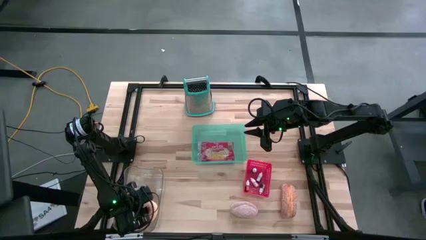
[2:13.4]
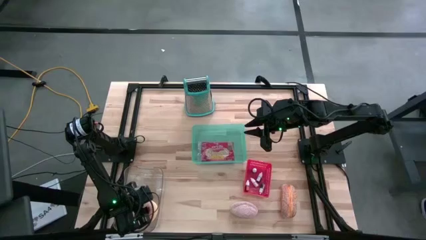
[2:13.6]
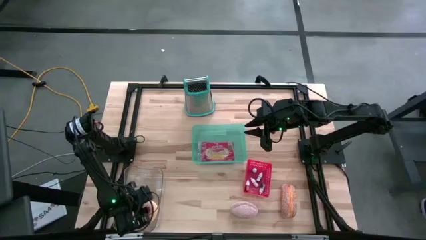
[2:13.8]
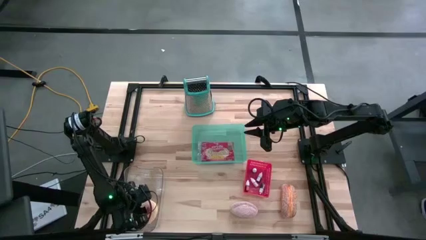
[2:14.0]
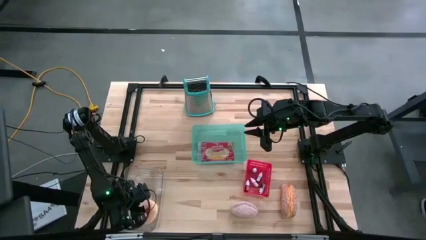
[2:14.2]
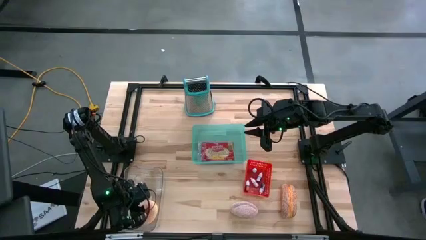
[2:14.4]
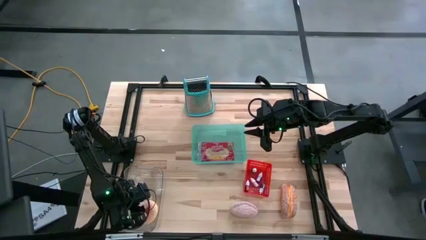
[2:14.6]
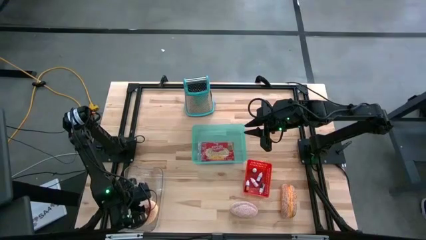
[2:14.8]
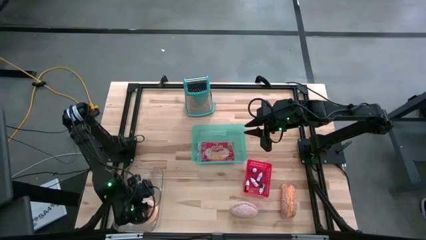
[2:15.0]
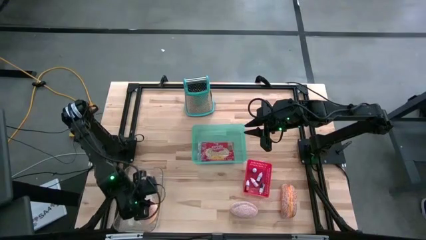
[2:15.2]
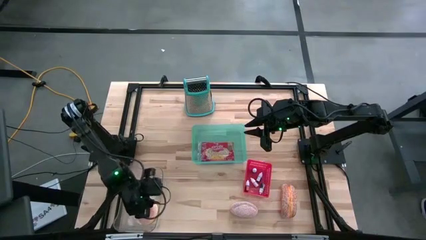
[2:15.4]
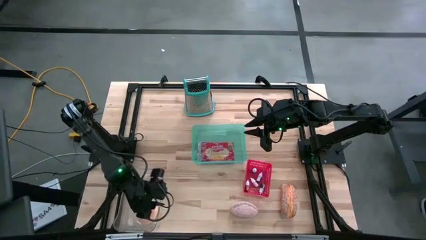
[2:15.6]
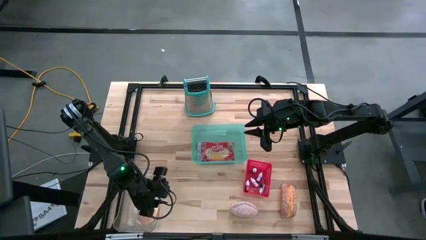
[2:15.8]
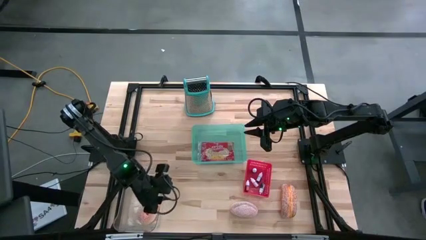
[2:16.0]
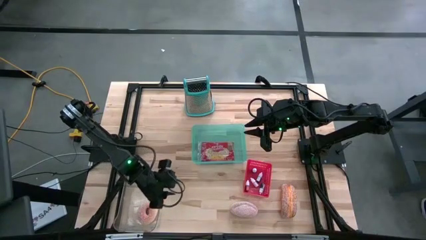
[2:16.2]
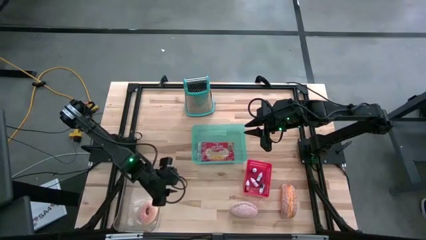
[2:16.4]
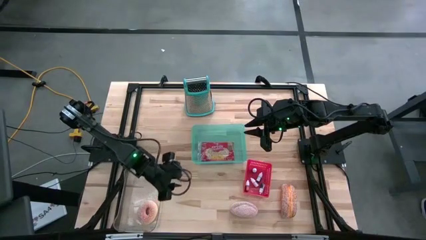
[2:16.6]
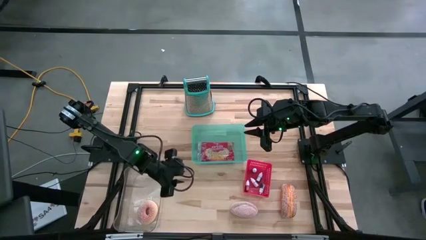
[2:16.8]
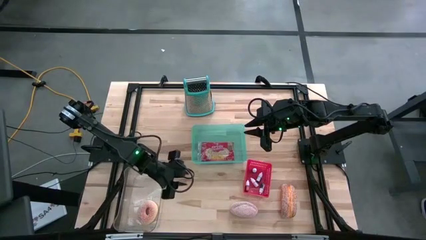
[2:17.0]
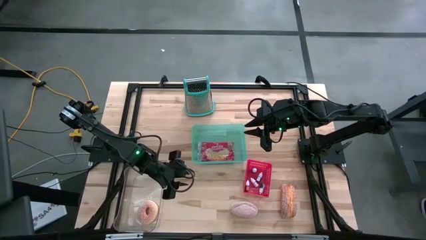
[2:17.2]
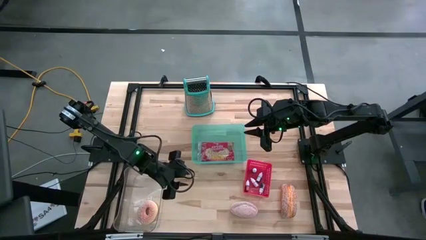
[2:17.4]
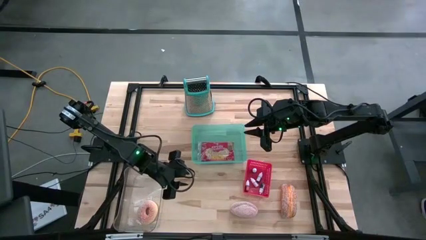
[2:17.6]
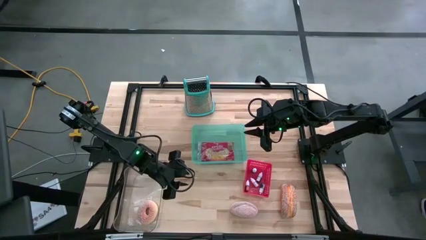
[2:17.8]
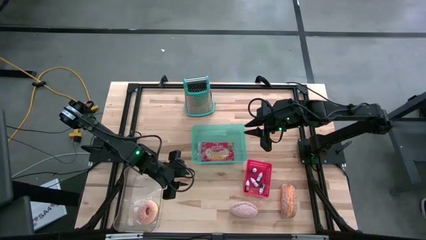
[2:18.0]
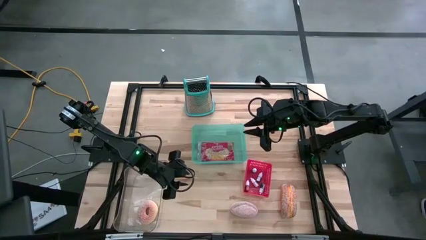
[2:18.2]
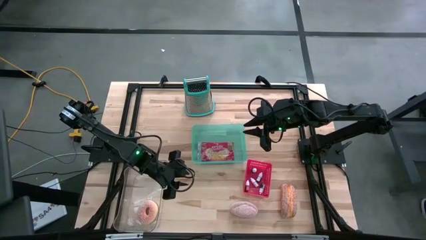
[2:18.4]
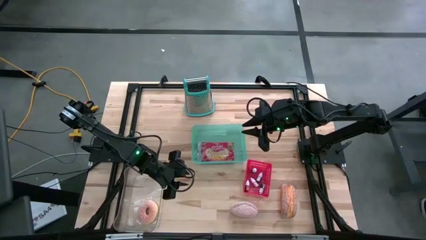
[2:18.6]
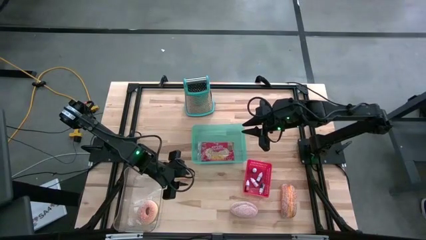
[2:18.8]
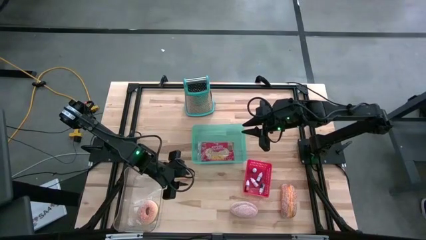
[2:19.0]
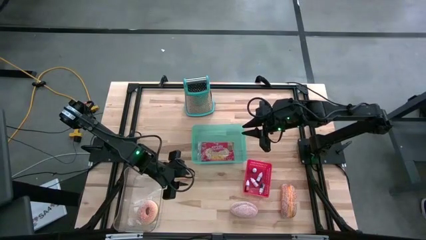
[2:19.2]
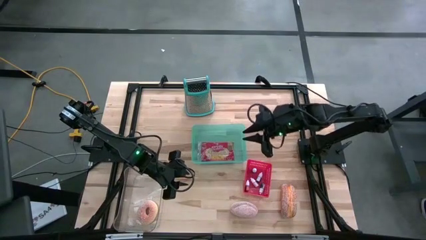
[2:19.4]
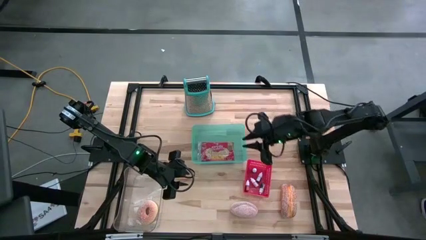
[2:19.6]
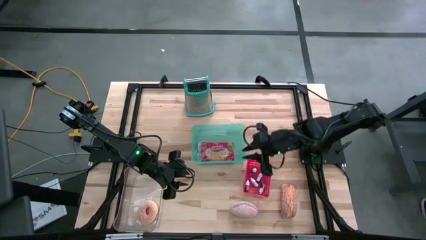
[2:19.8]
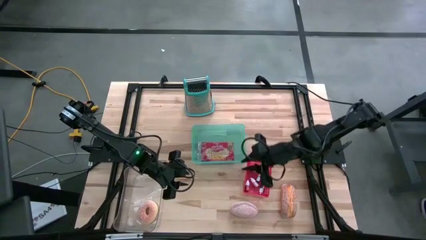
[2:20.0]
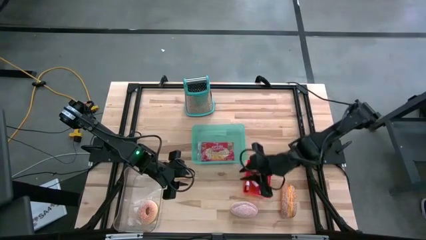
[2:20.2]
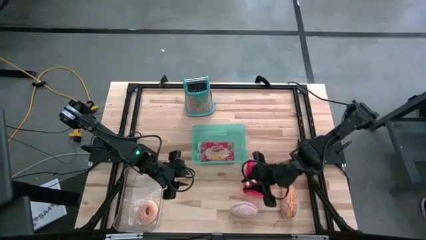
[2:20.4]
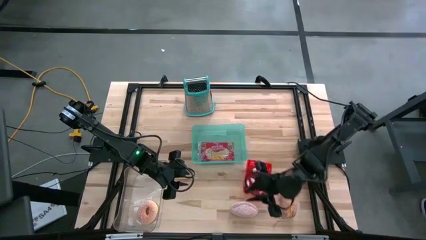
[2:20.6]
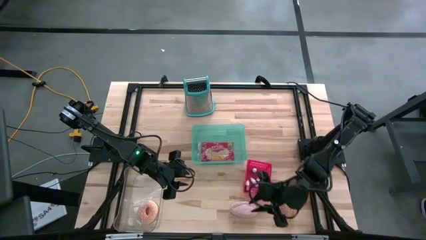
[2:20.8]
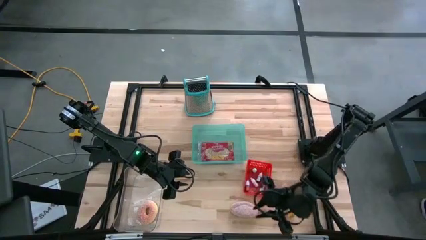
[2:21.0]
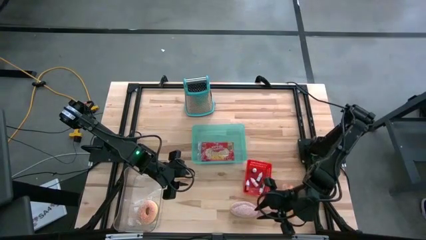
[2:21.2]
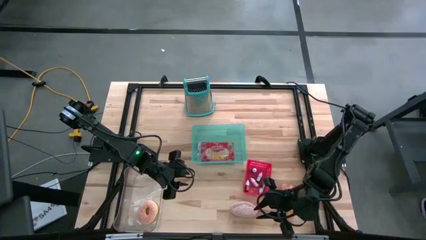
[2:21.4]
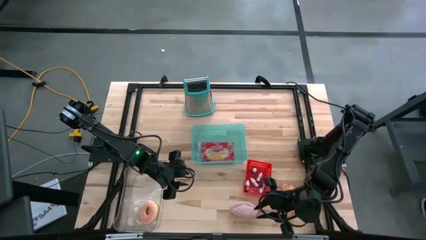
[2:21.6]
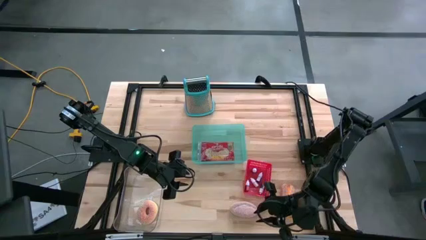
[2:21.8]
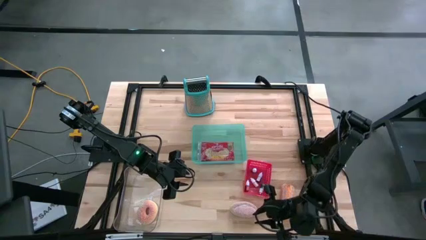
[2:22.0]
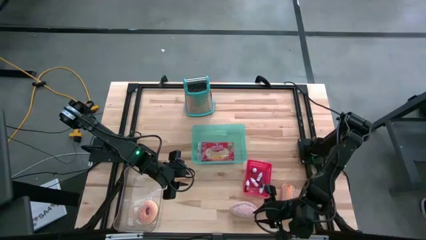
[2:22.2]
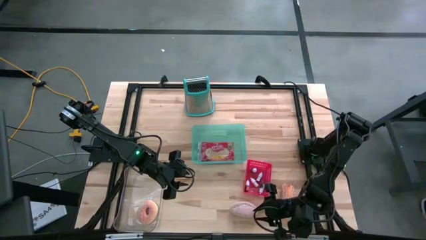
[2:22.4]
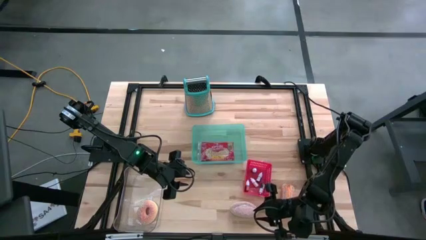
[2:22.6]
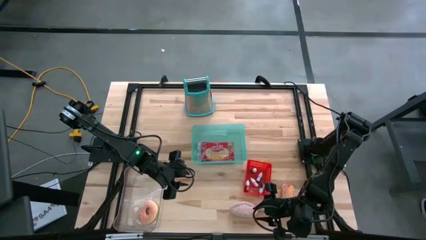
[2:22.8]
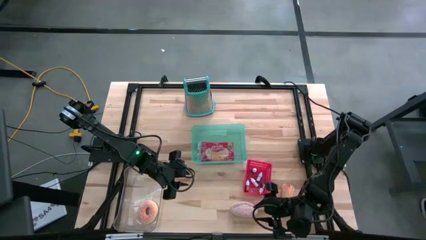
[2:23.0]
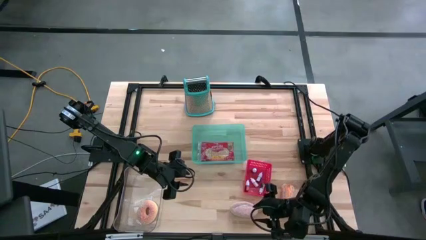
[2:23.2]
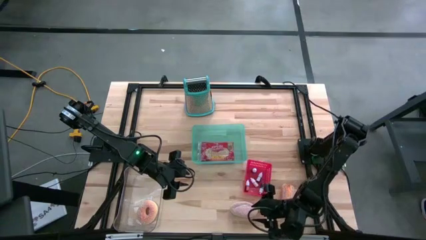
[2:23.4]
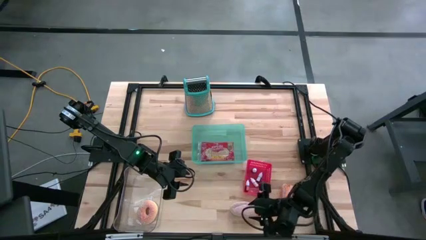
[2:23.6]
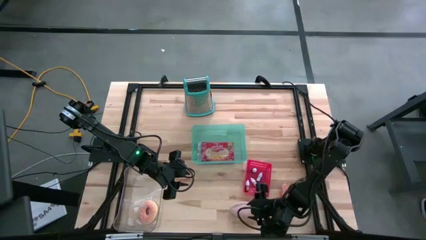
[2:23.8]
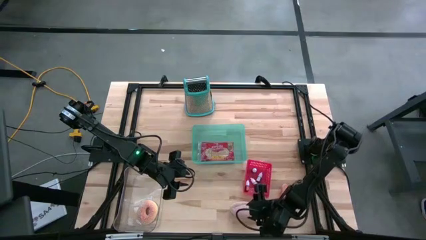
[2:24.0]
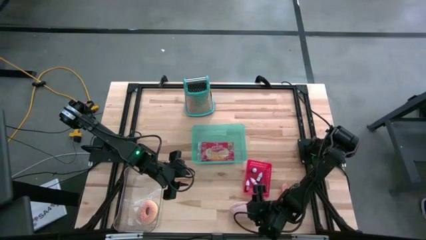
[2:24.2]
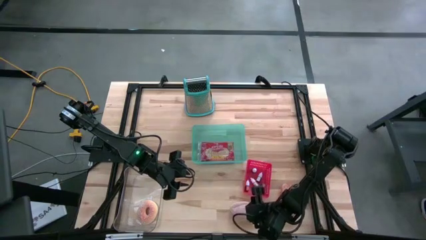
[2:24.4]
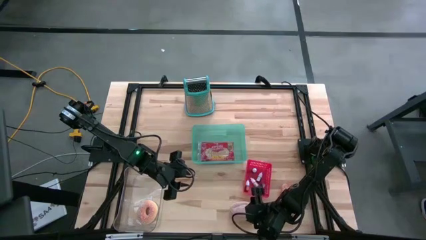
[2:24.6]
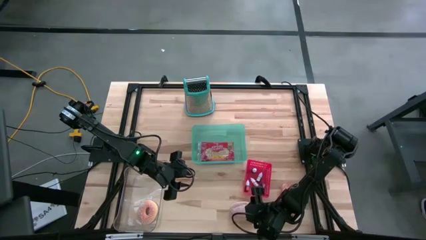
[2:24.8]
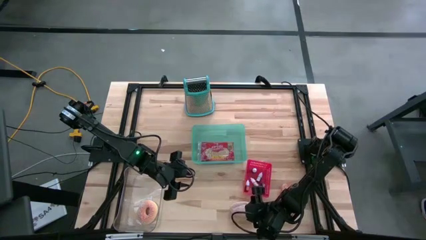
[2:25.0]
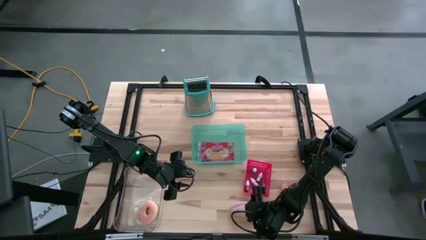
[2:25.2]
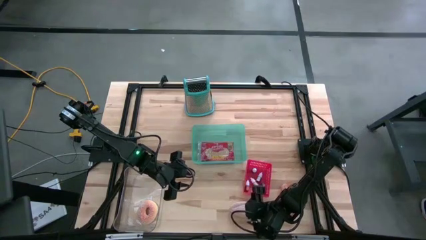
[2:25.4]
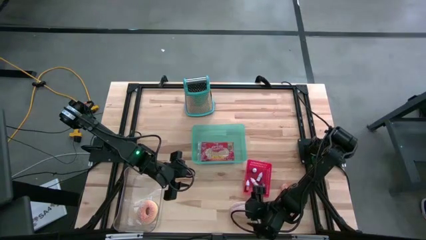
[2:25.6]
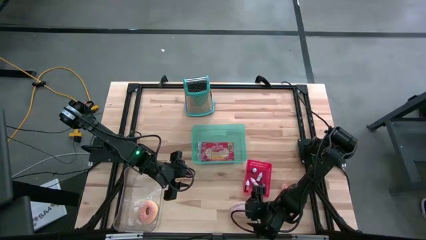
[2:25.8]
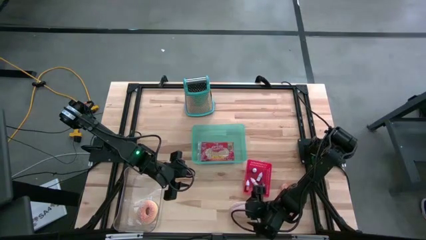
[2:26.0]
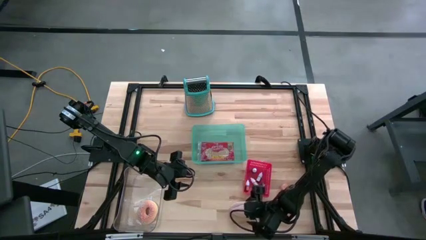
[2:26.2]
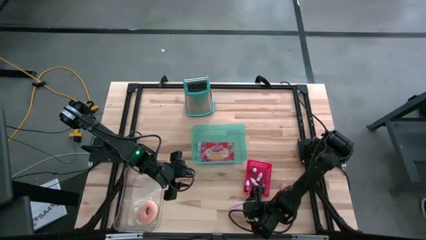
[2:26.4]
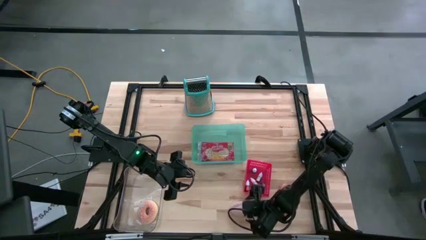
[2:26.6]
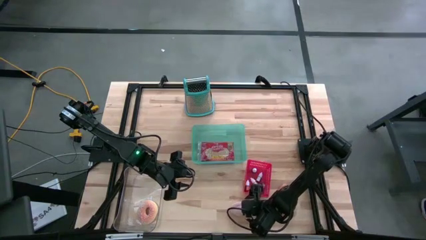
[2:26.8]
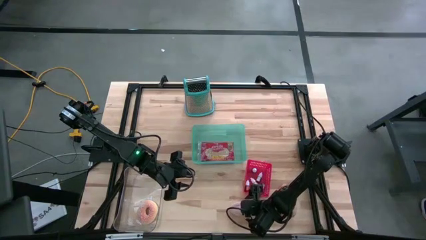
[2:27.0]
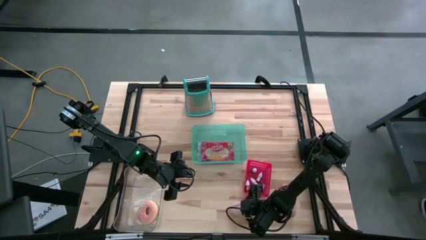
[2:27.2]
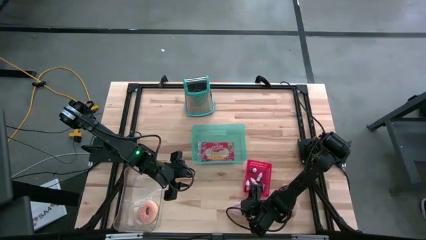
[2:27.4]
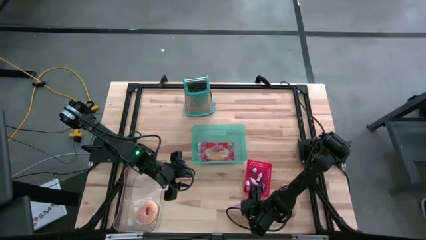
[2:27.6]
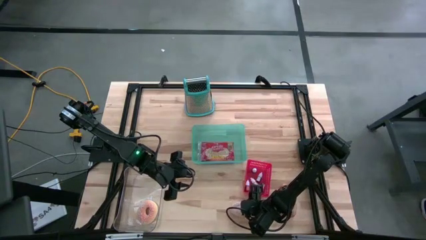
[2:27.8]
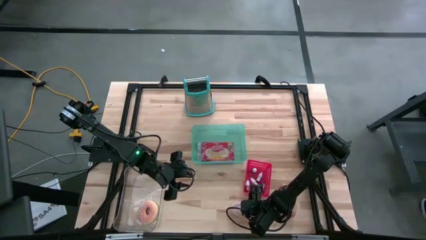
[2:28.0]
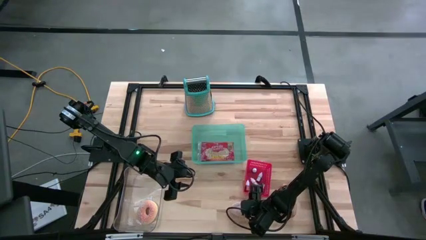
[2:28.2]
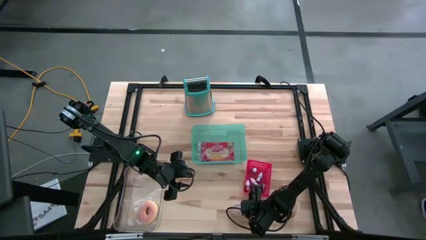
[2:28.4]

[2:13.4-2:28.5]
Task: Pick & Place Food Item
Put the left bread into the transparent bin
